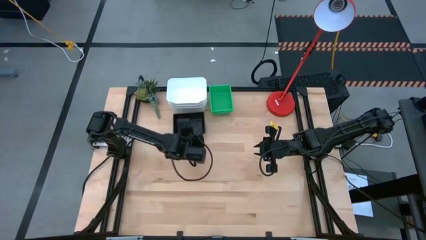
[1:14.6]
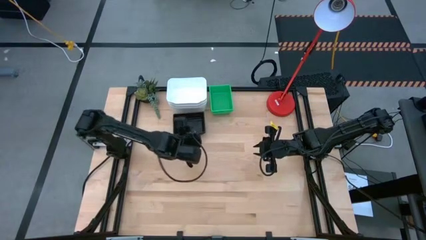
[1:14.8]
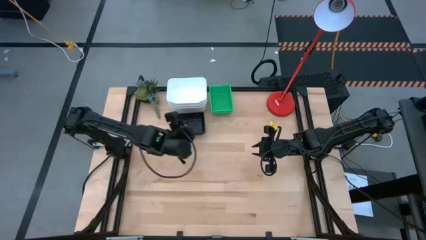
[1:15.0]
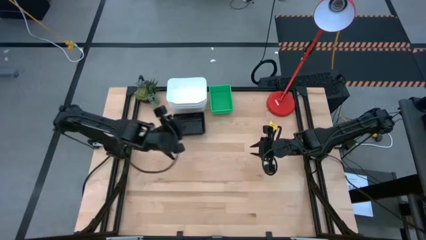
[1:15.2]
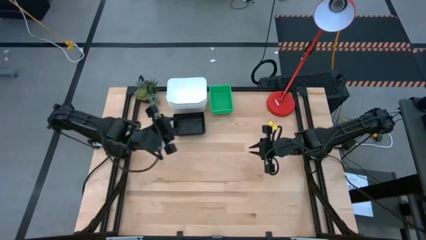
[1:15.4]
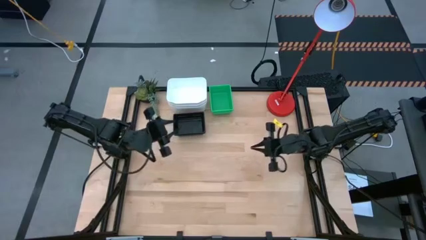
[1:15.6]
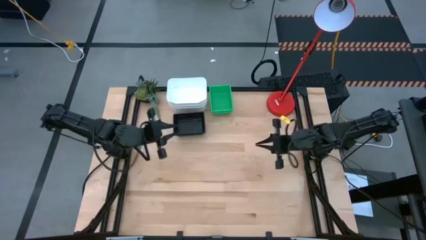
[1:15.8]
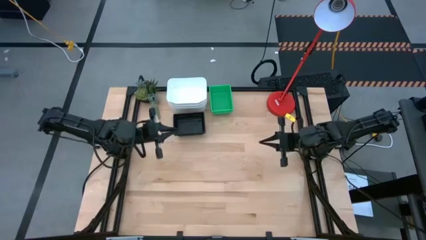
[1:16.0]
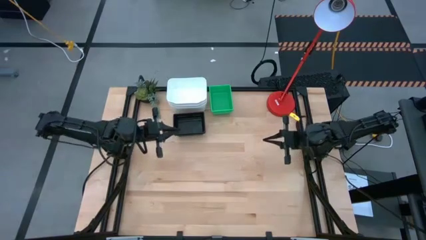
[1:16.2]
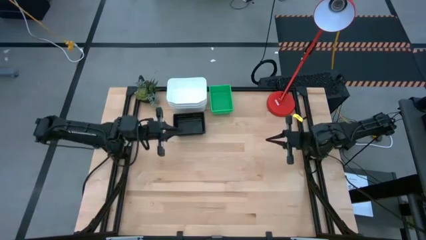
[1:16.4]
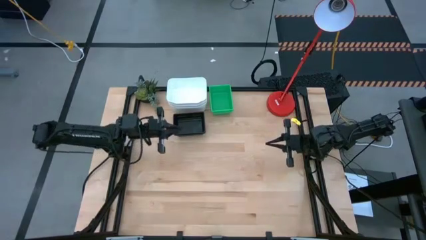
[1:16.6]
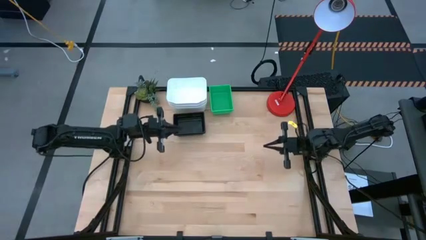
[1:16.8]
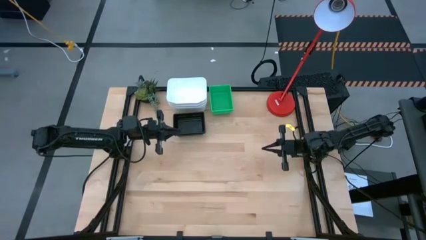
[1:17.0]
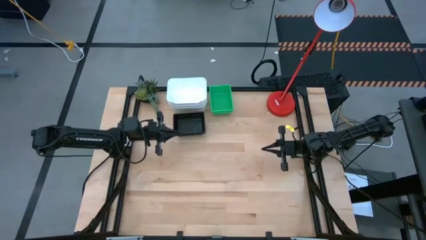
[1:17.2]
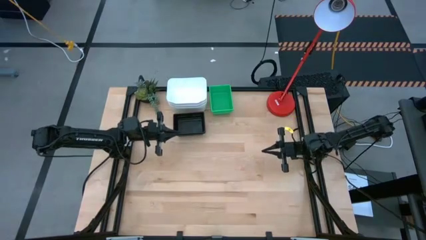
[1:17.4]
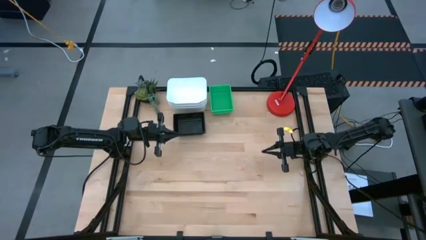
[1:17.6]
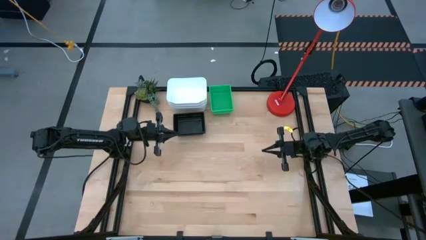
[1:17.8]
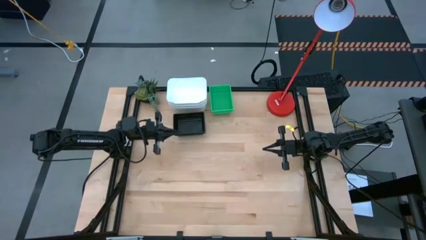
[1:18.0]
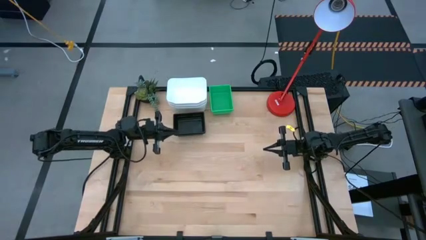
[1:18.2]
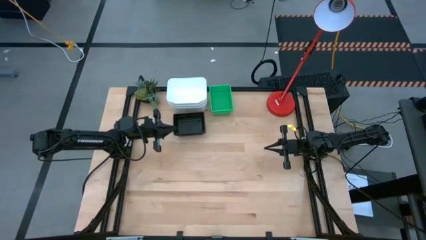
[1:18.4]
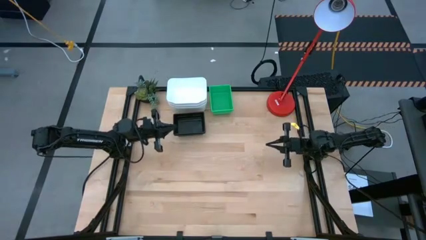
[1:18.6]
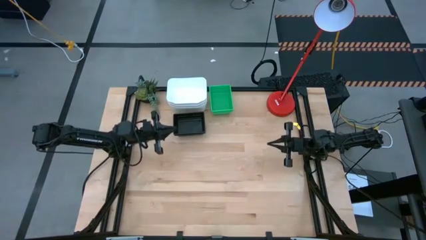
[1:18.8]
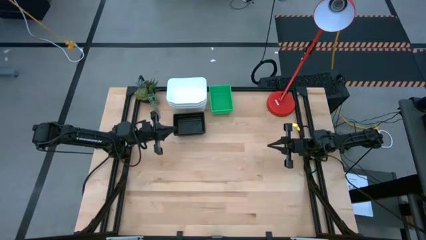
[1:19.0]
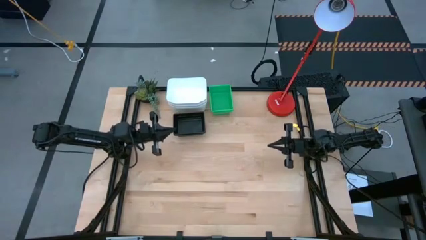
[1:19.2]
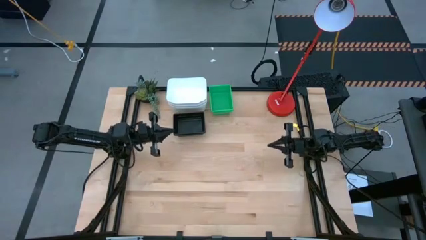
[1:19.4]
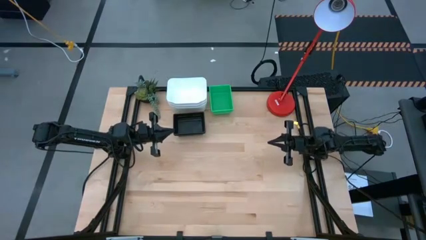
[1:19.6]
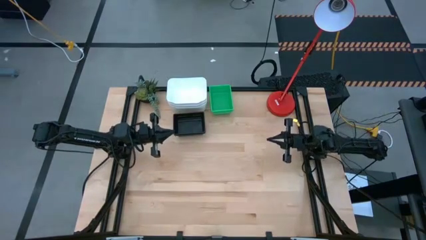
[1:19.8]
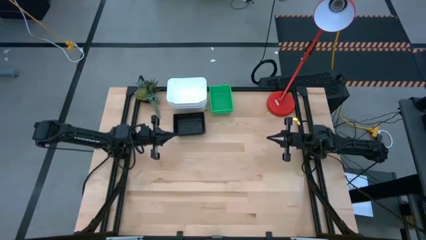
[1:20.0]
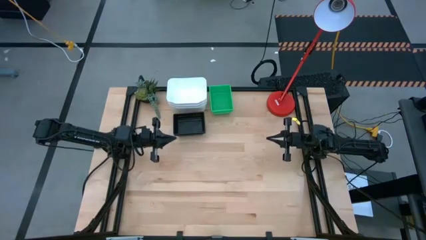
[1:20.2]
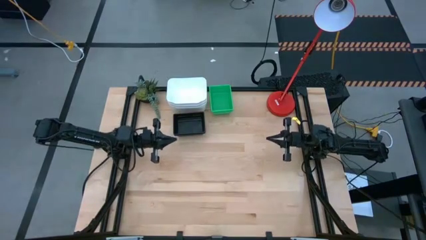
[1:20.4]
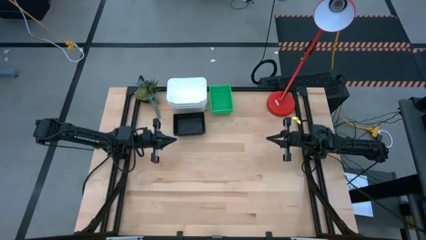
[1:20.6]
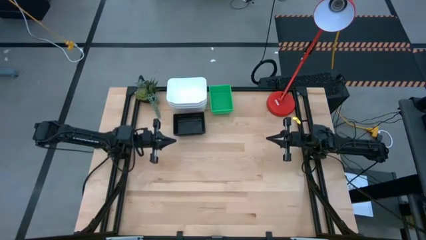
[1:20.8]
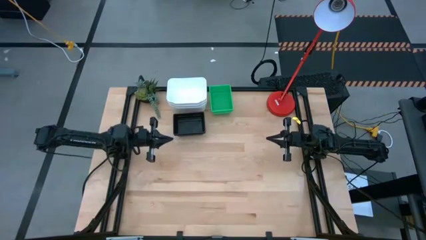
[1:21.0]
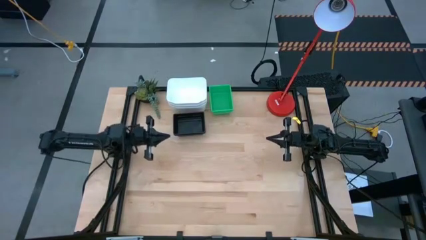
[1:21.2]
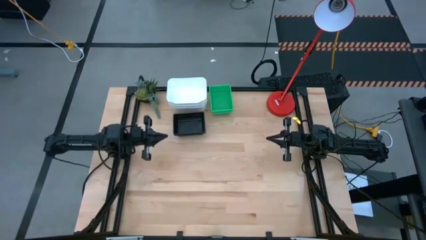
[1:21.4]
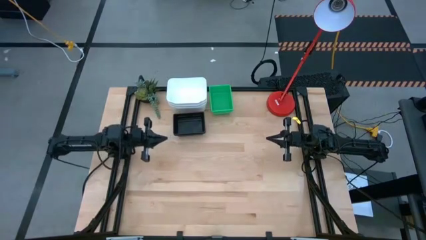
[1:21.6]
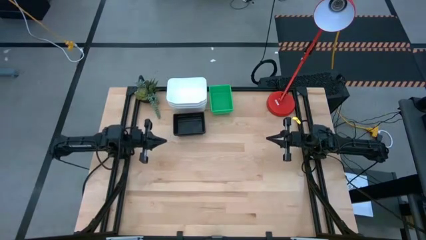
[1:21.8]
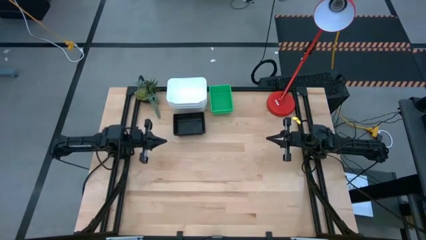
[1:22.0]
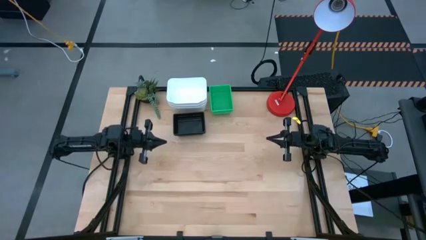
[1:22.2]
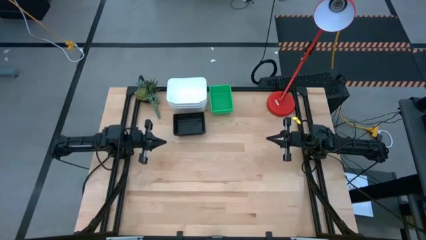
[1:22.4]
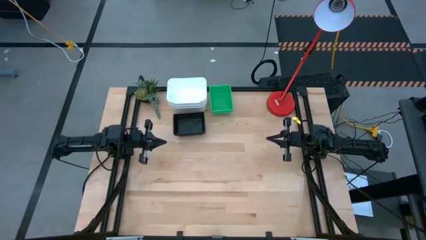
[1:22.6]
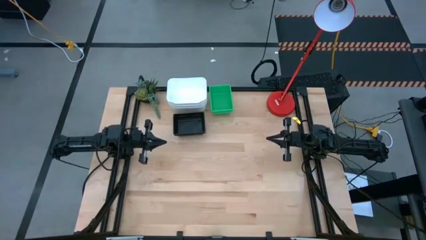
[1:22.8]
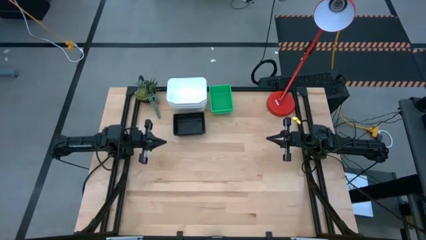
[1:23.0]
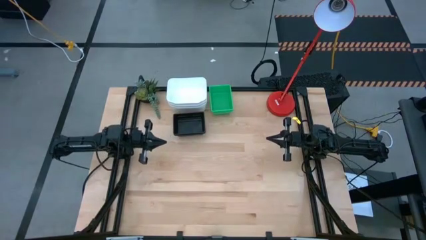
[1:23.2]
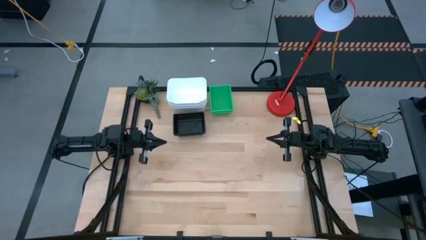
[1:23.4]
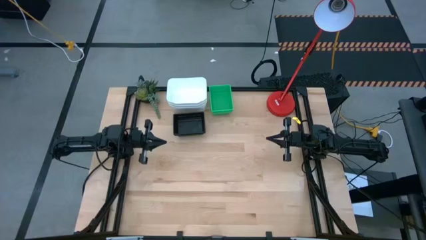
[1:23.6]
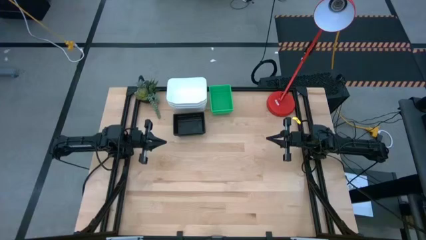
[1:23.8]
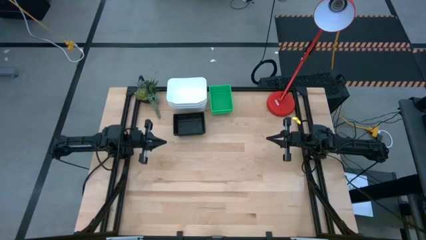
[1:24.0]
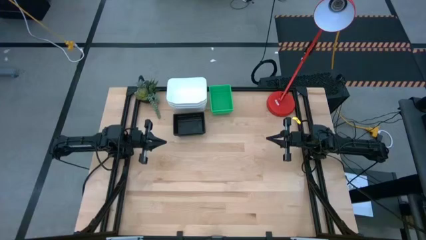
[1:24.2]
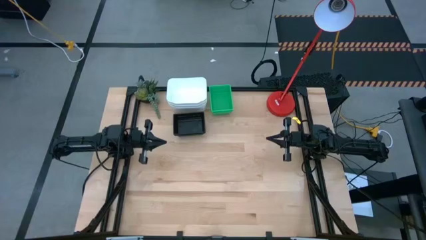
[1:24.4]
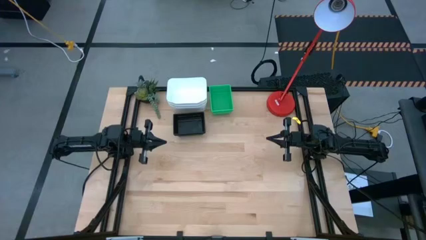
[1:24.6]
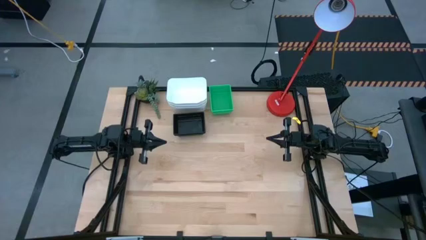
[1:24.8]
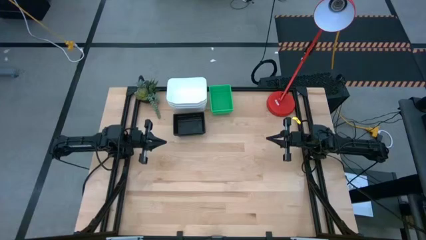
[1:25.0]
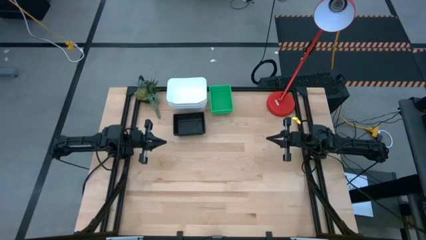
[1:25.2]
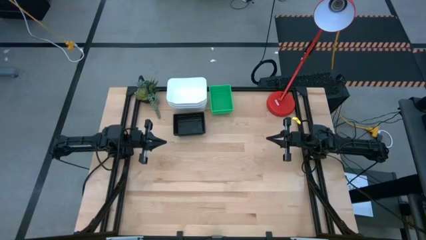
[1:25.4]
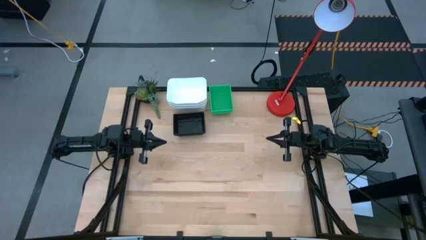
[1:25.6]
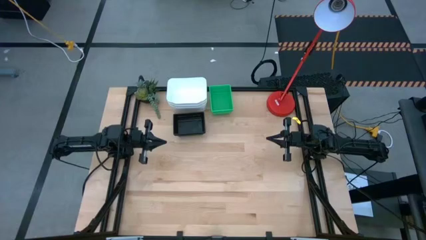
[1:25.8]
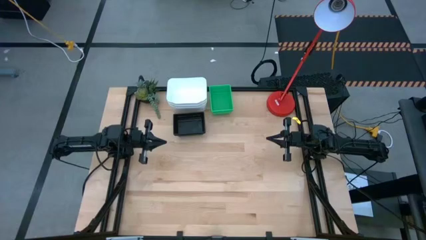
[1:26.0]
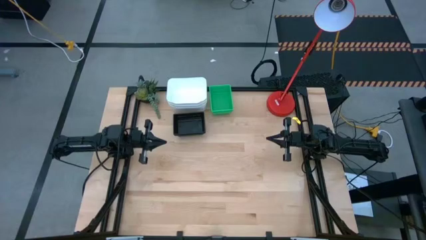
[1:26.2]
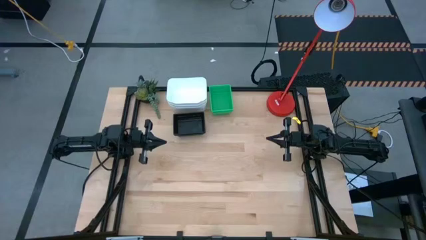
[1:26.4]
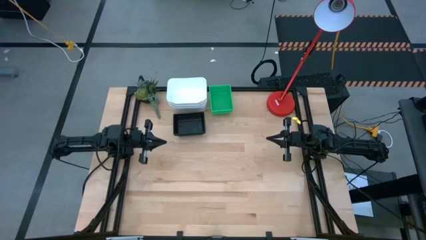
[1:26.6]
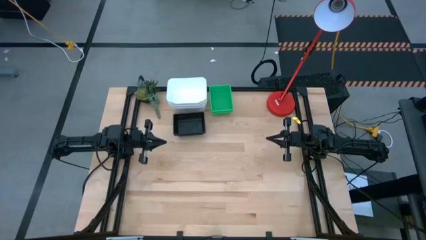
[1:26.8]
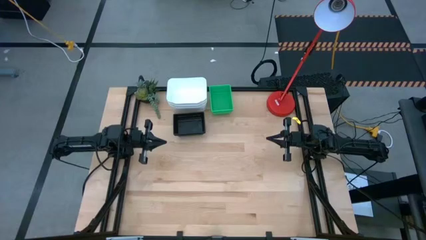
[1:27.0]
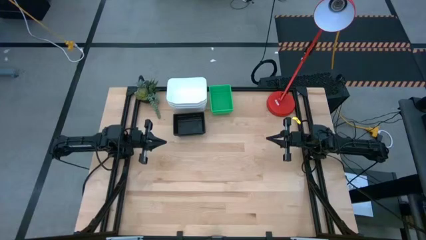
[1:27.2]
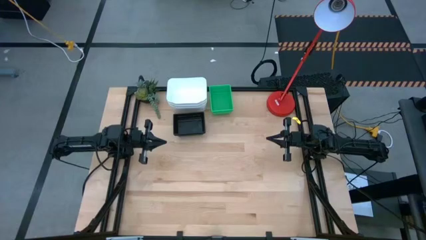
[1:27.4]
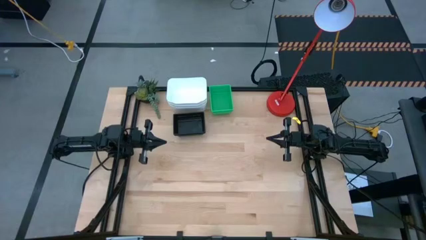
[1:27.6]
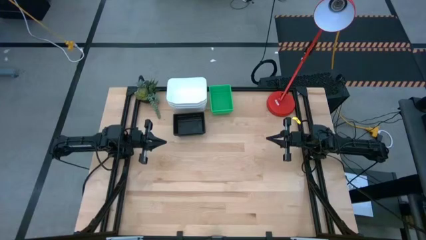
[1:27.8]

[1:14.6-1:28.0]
Return to Home Position
